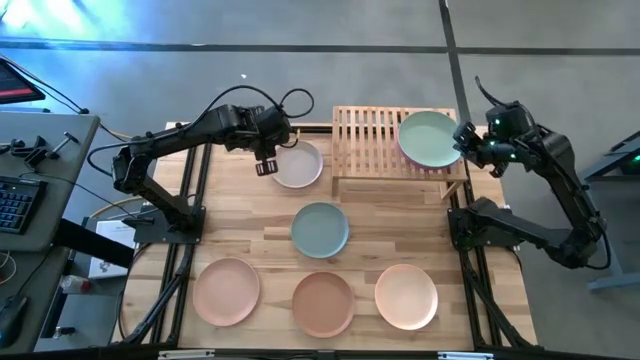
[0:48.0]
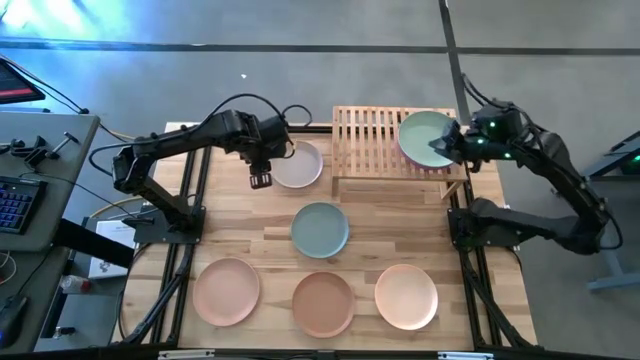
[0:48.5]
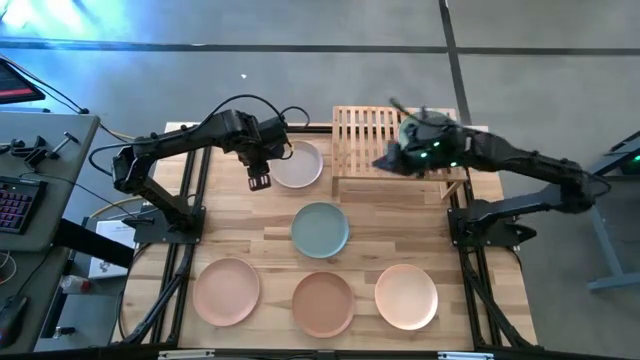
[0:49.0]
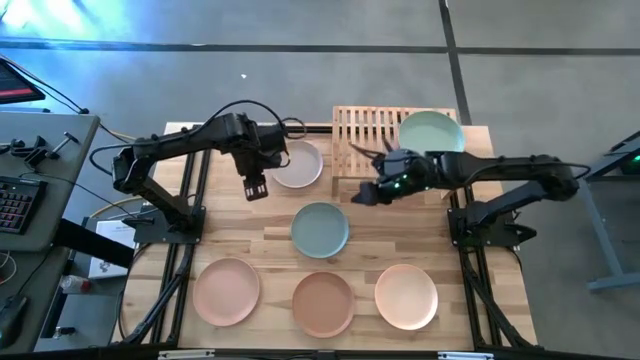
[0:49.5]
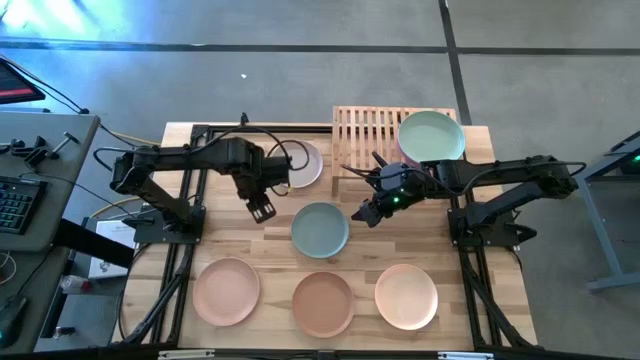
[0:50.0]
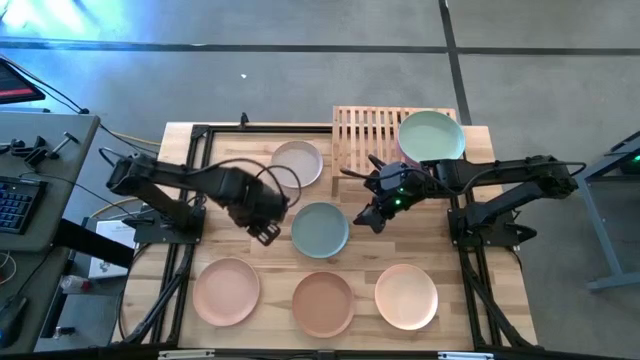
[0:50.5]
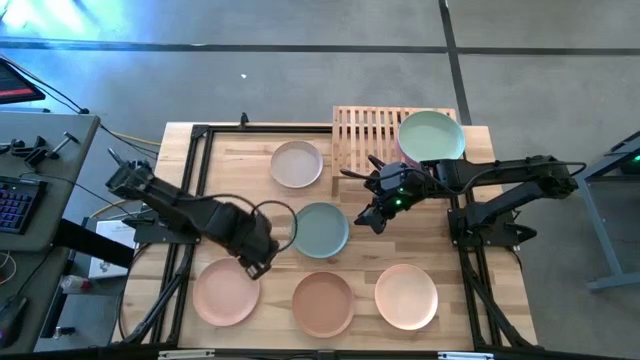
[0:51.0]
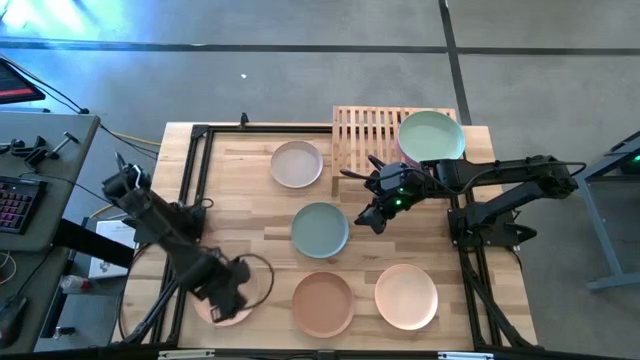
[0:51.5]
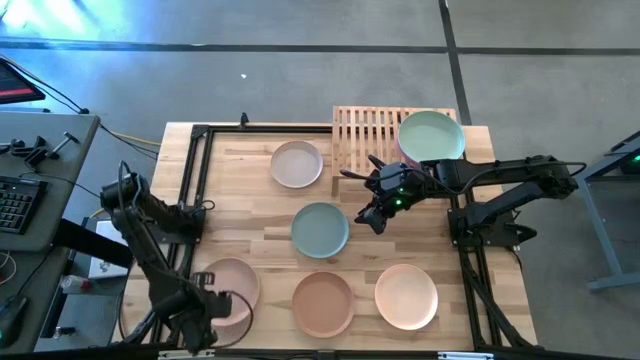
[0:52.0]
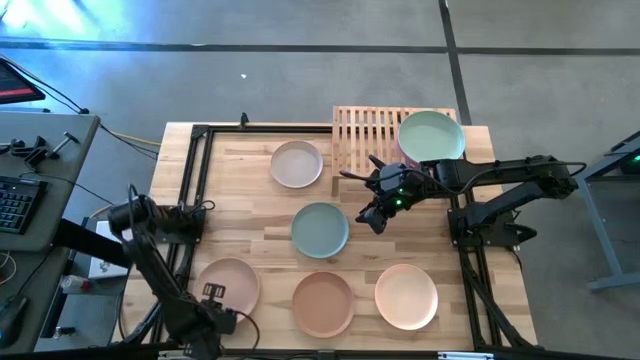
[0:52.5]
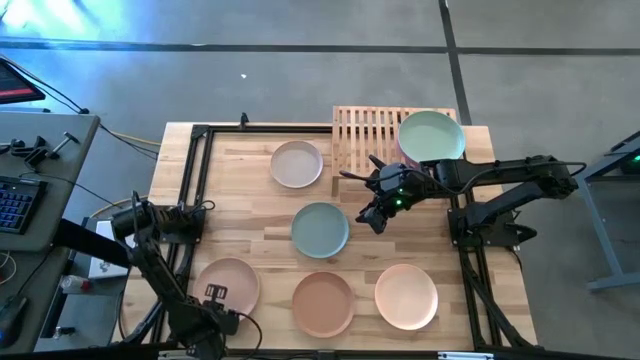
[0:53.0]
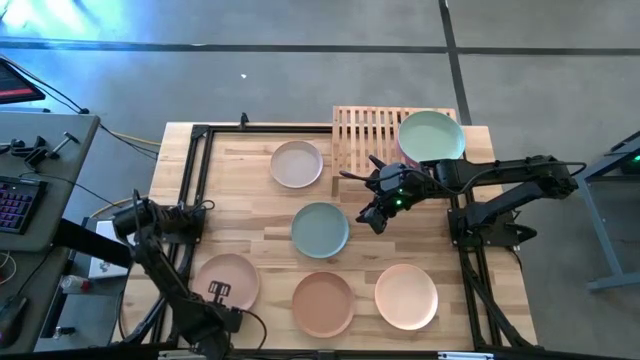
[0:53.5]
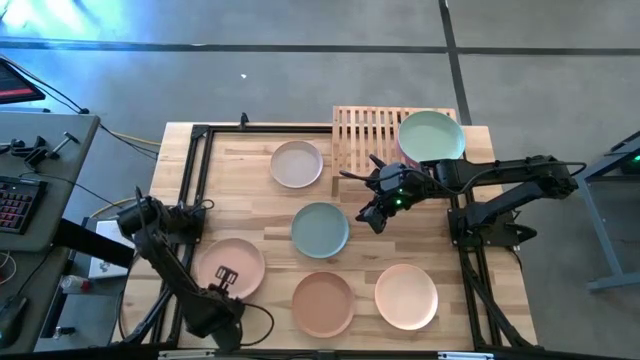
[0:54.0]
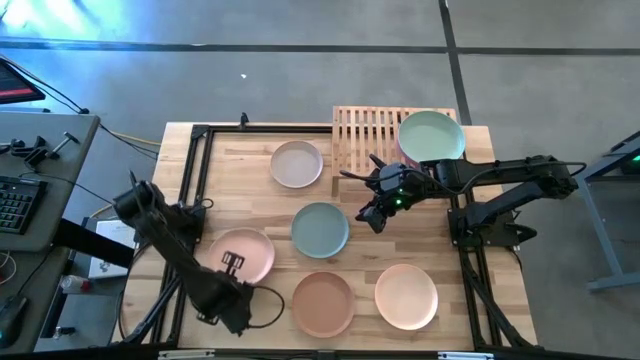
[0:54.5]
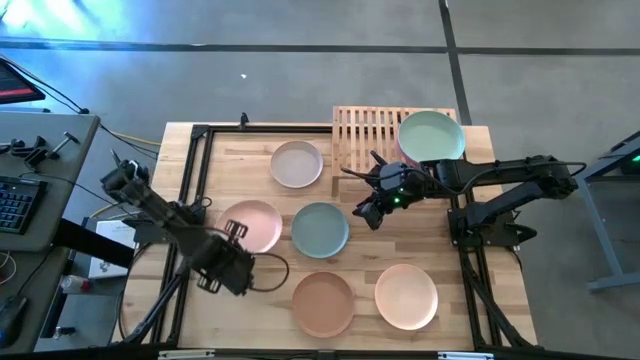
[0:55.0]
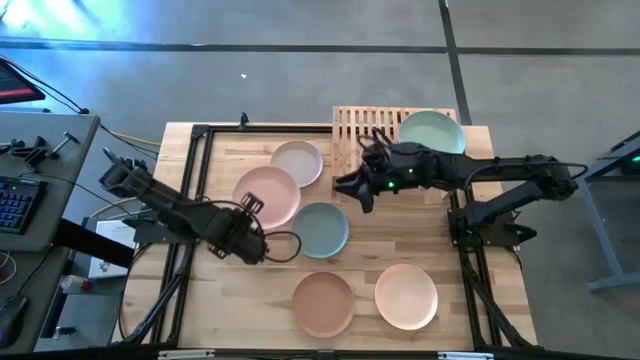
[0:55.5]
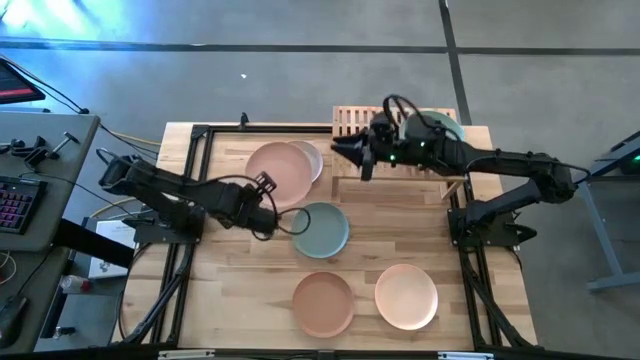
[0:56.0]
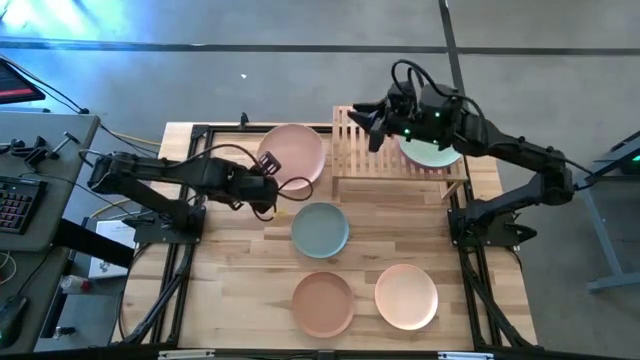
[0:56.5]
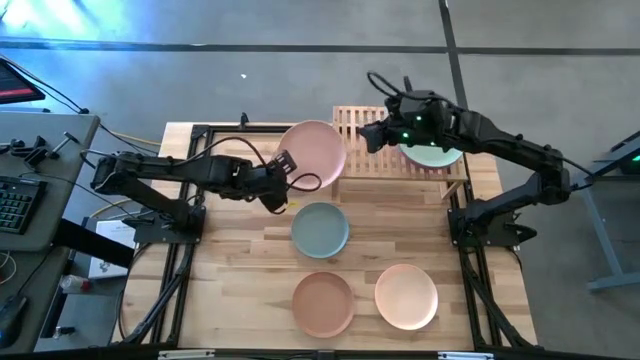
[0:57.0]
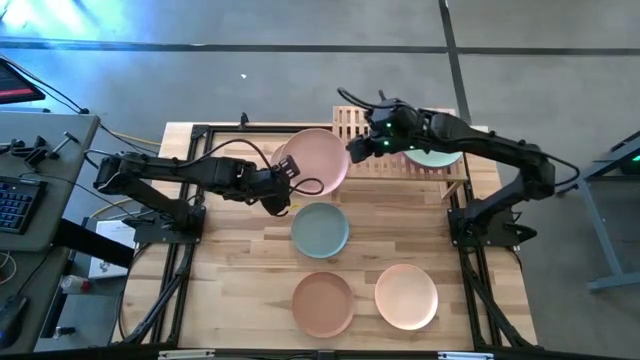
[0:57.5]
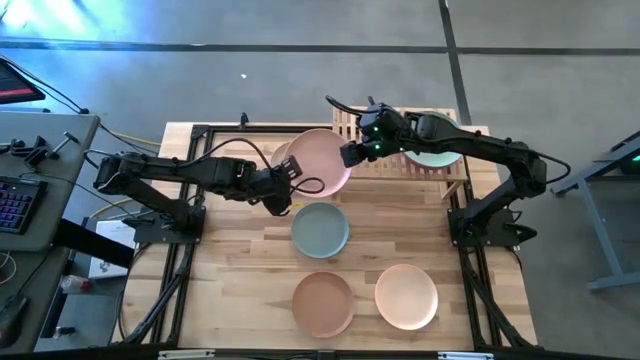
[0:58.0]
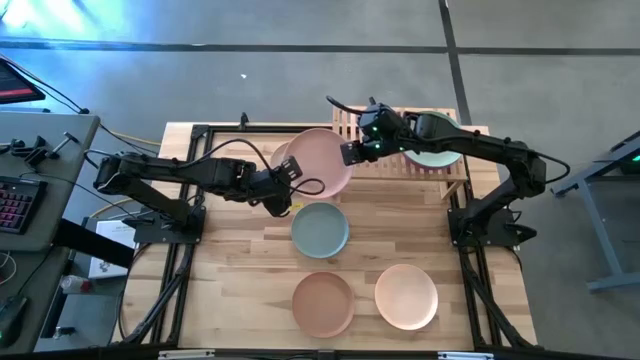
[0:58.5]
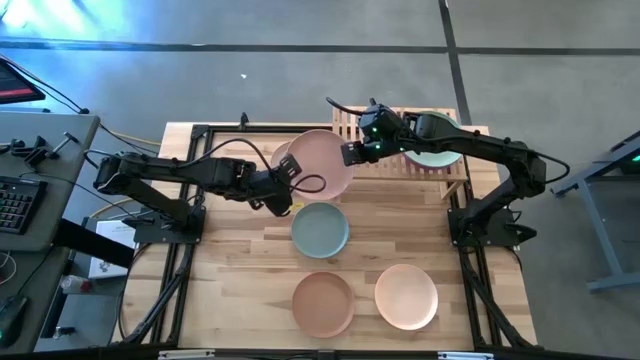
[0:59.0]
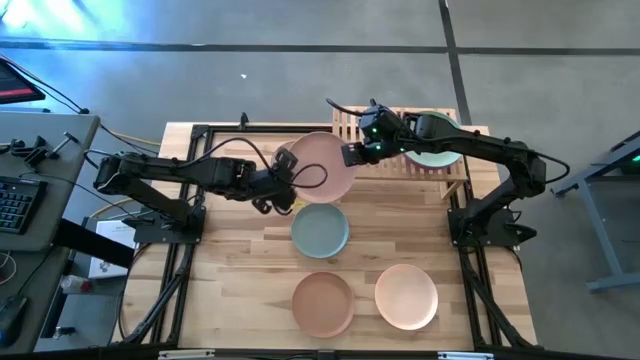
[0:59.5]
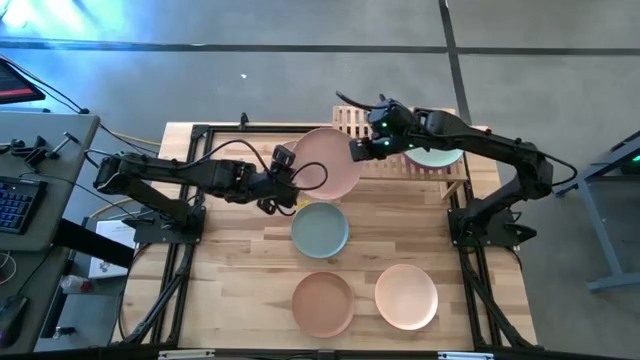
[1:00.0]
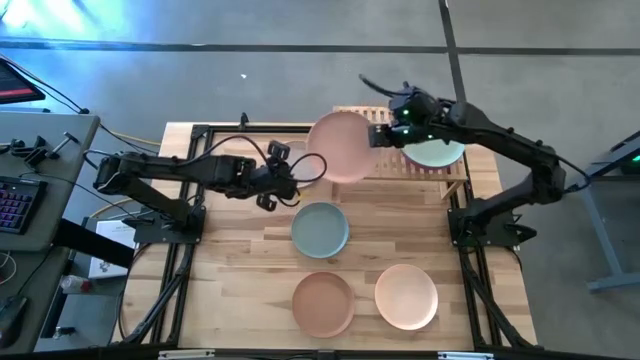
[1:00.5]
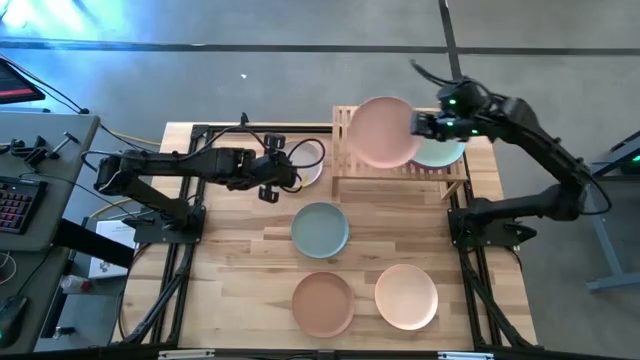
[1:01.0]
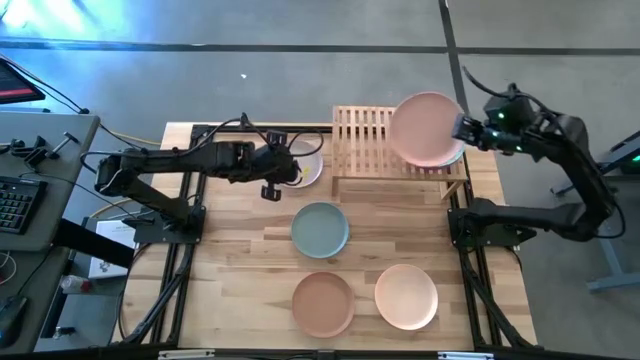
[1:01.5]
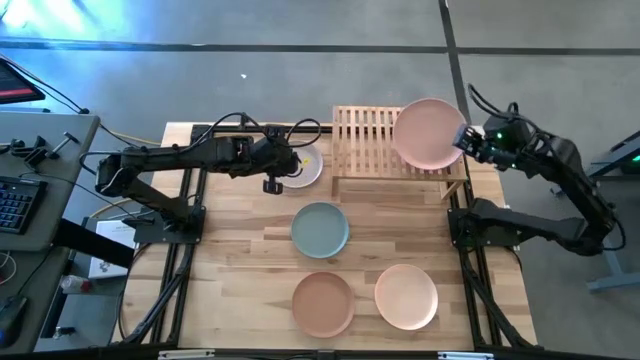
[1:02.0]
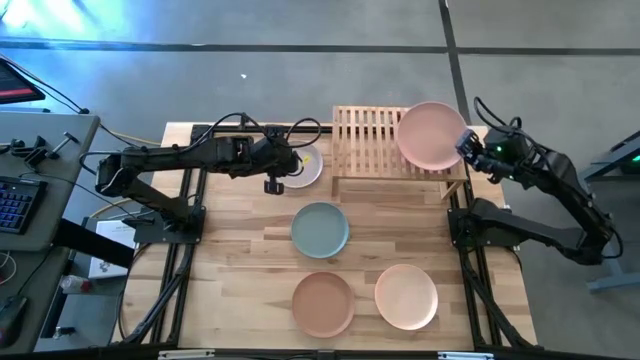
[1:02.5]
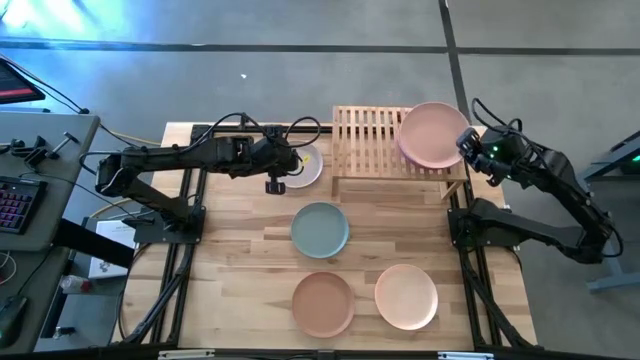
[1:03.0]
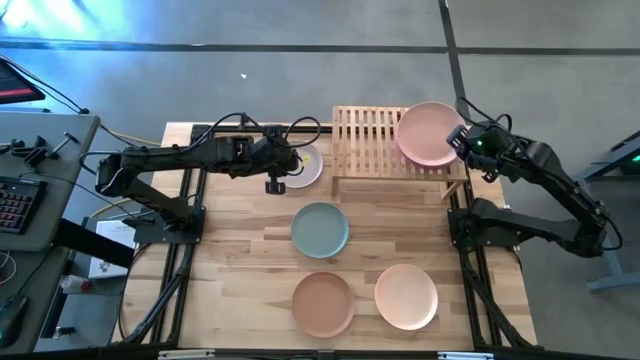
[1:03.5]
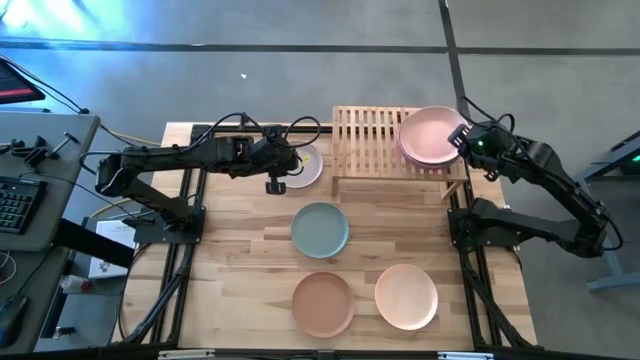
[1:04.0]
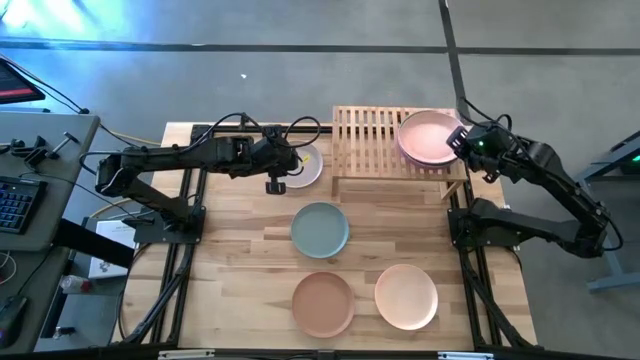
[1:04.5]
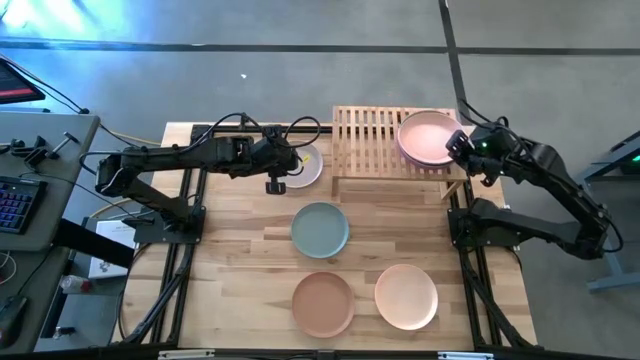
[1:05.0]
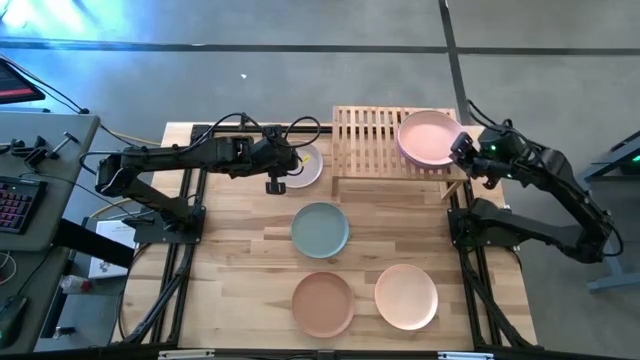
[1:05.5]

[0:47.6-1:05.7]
Task: Place and stack plates onto a shelf
Stack the light brown plate on the green plate on the shelf

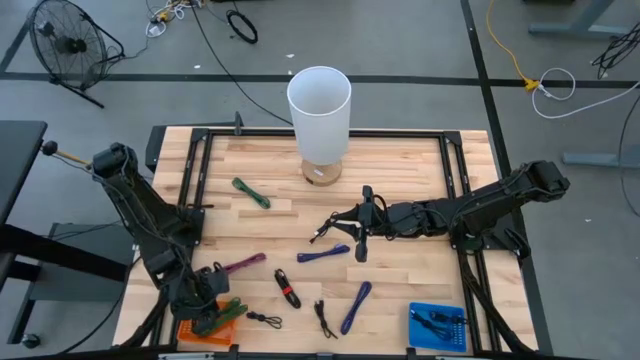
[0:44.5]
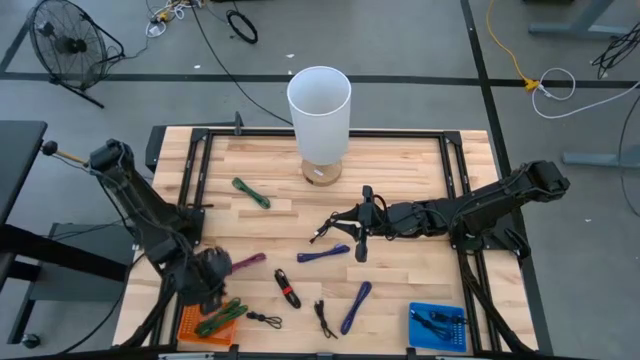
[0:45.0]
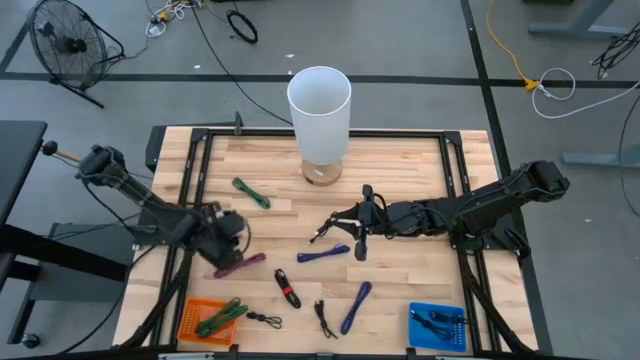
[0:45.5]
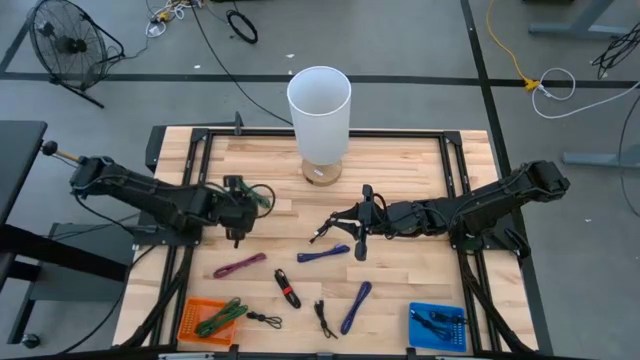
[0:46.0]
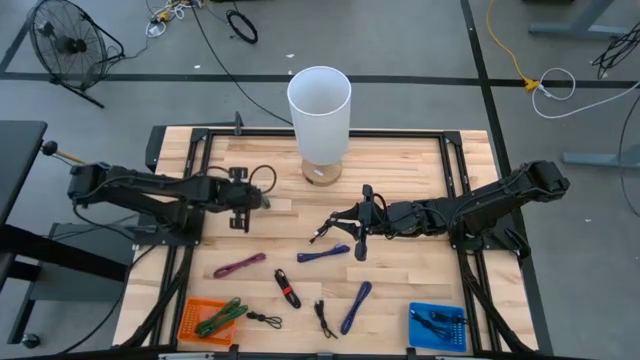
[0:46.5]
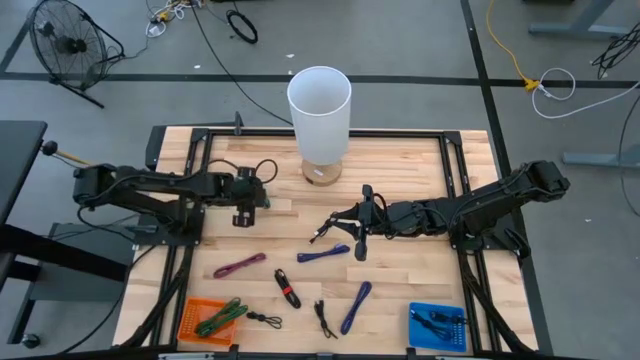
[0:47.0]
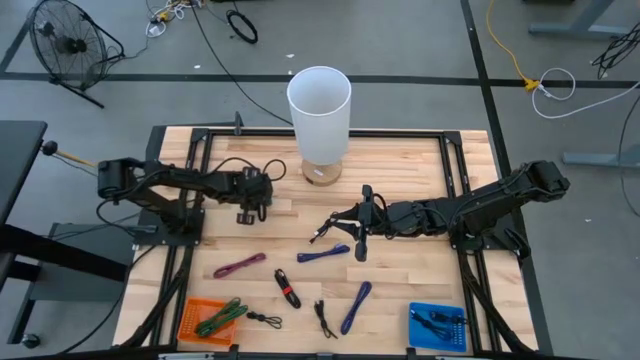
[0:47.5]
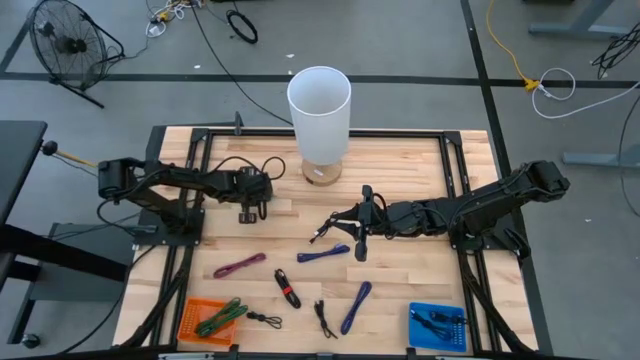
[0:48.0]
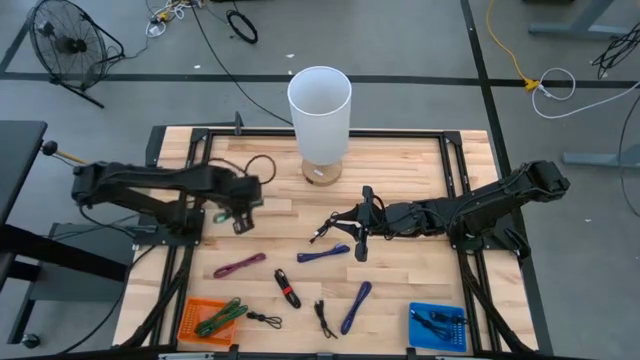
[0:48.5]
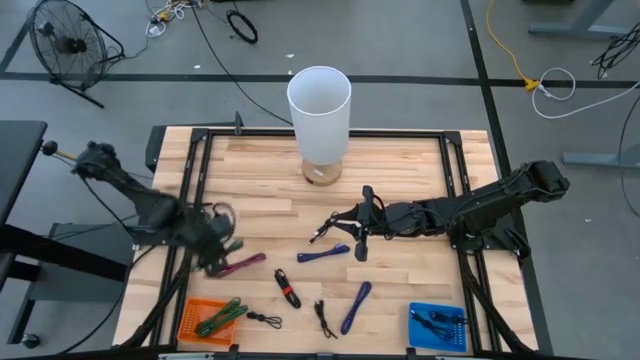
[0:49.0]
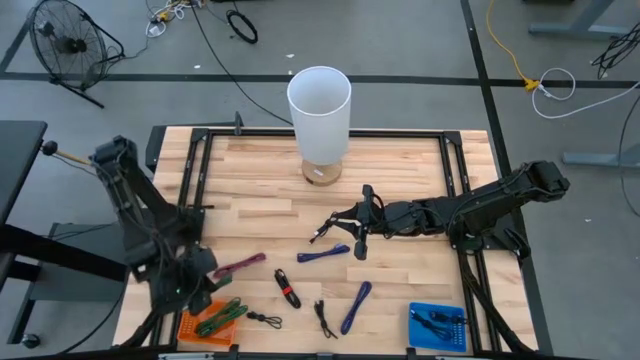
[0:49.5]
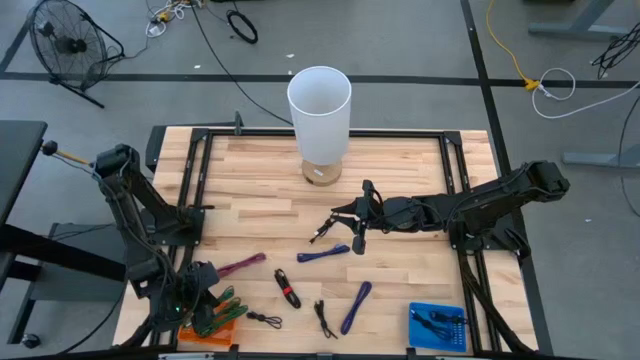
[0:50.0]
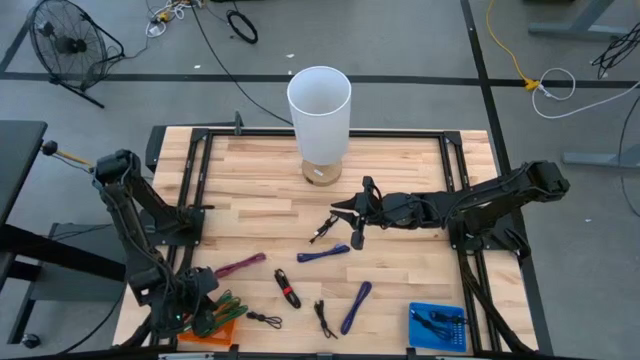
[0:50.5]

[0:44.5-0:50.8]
Task: Pick & Place USB Port
Put the black and green charger cable into the orange bin
